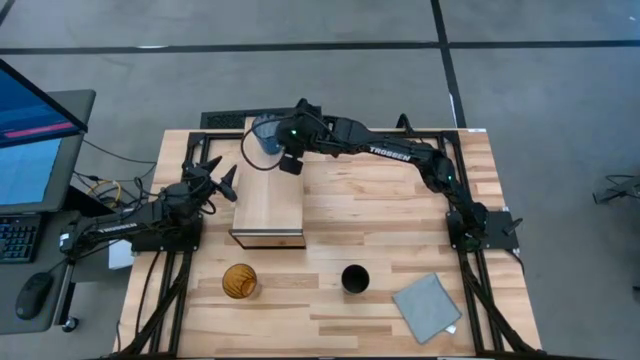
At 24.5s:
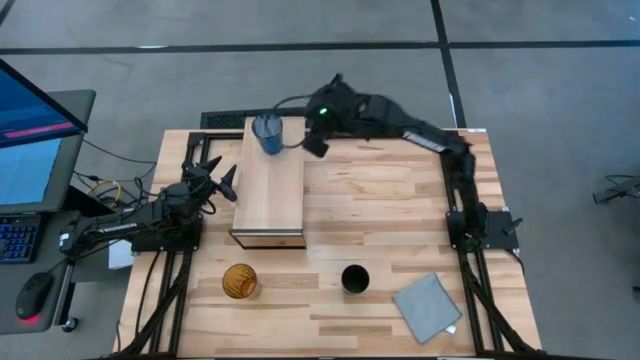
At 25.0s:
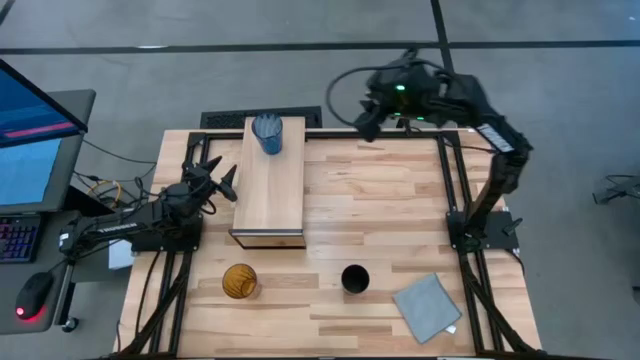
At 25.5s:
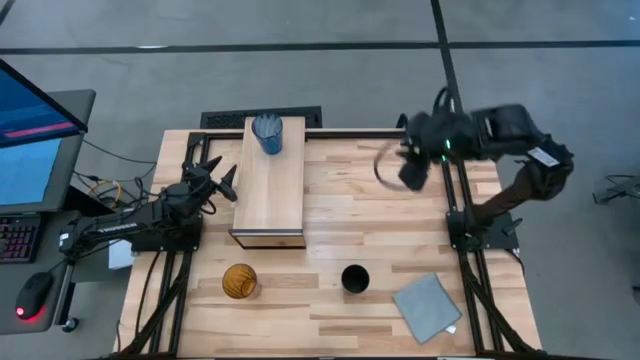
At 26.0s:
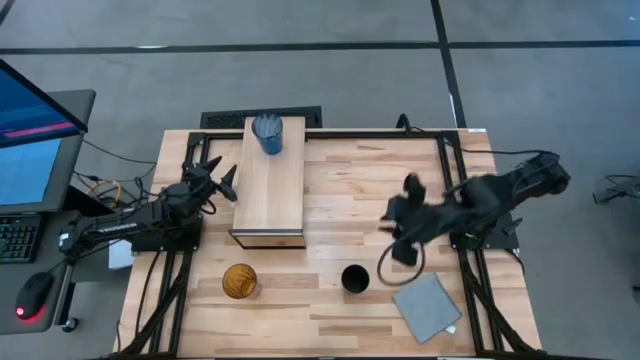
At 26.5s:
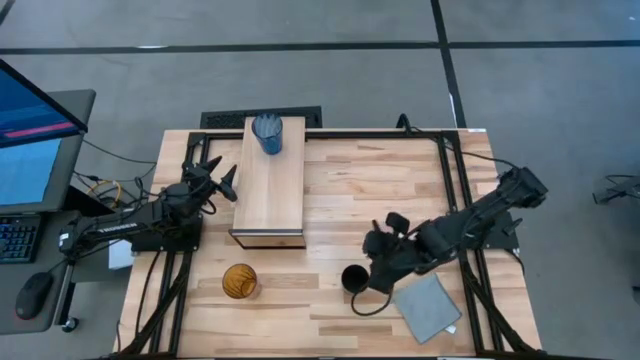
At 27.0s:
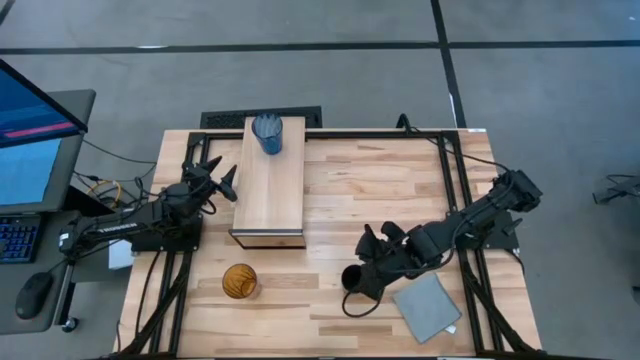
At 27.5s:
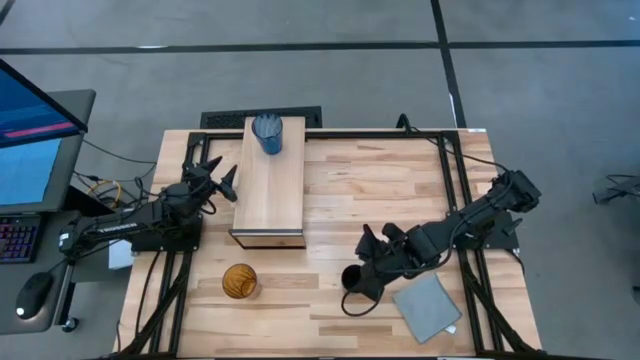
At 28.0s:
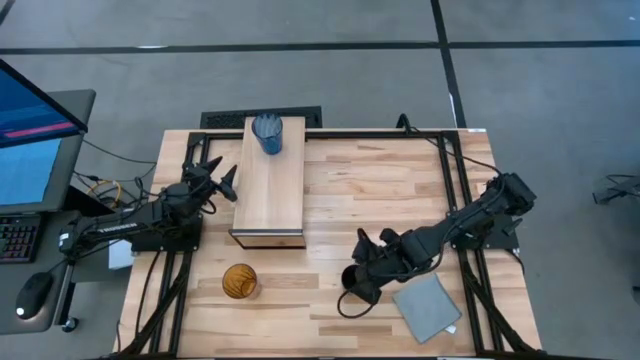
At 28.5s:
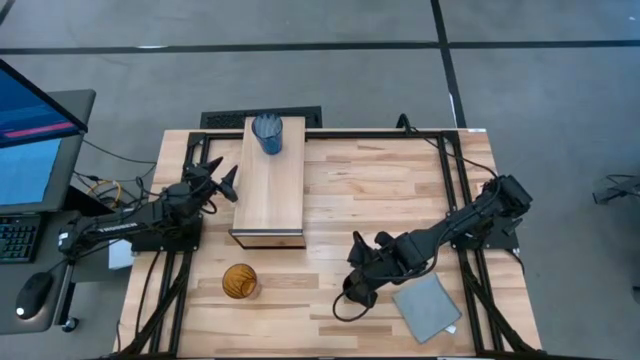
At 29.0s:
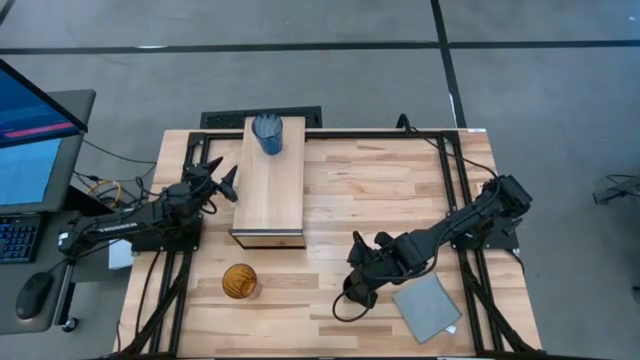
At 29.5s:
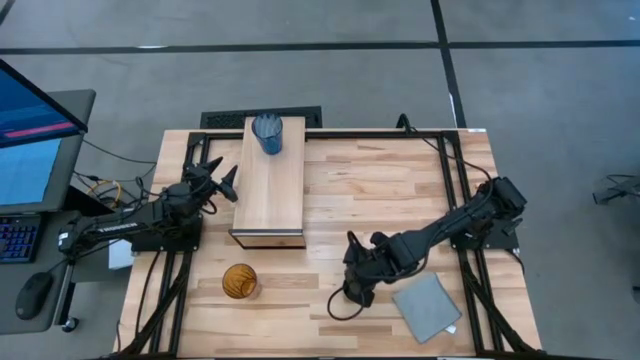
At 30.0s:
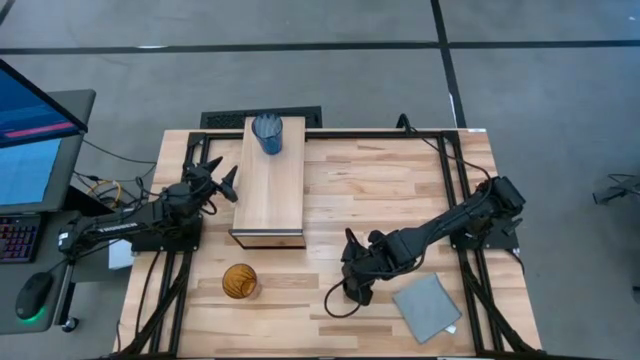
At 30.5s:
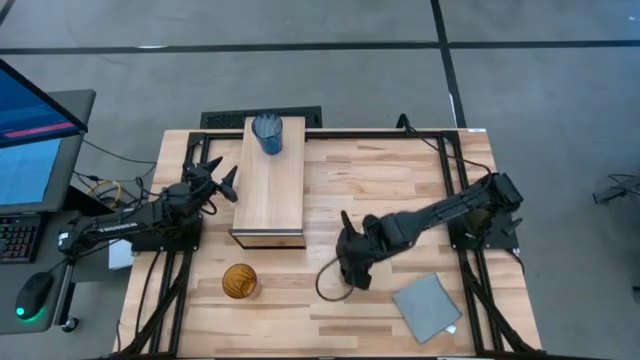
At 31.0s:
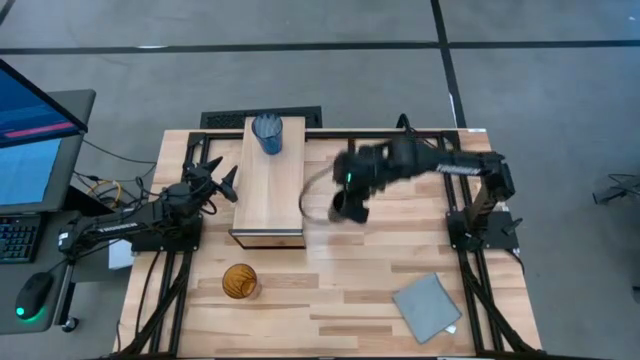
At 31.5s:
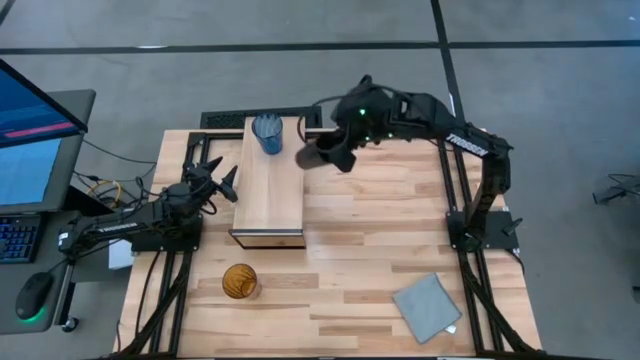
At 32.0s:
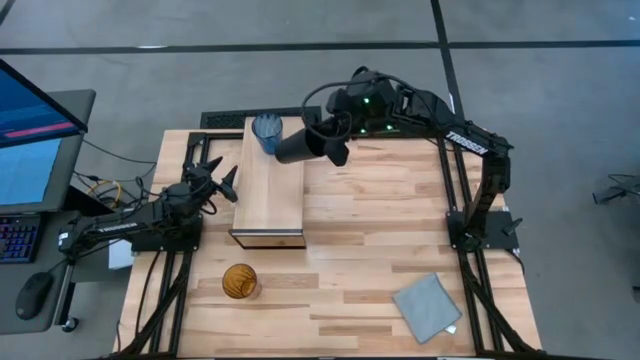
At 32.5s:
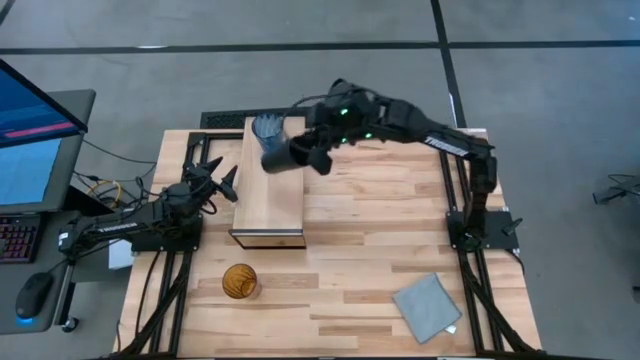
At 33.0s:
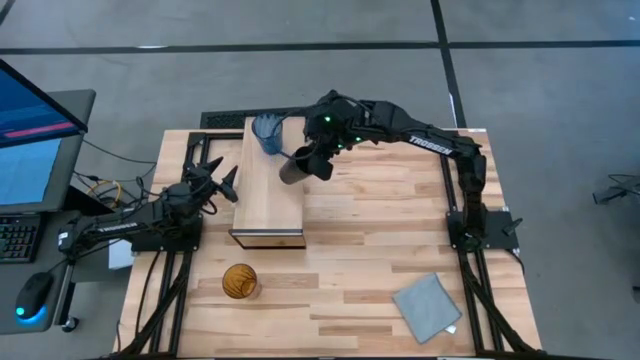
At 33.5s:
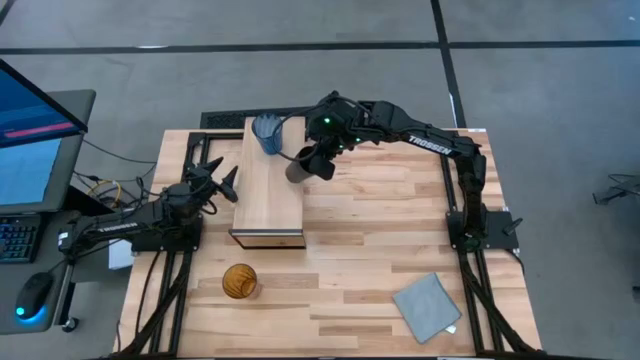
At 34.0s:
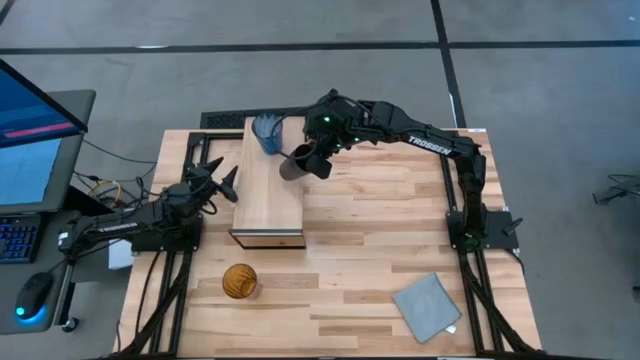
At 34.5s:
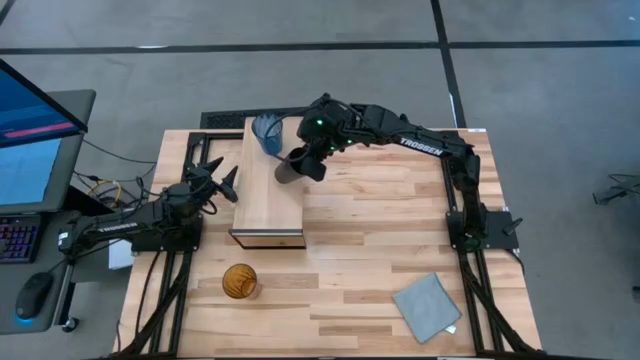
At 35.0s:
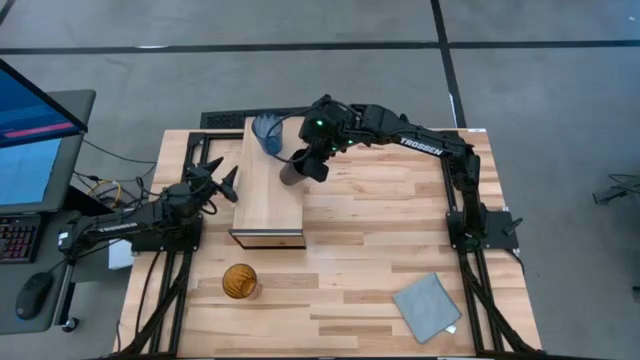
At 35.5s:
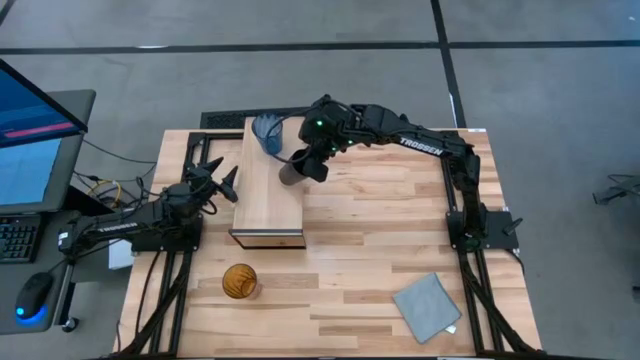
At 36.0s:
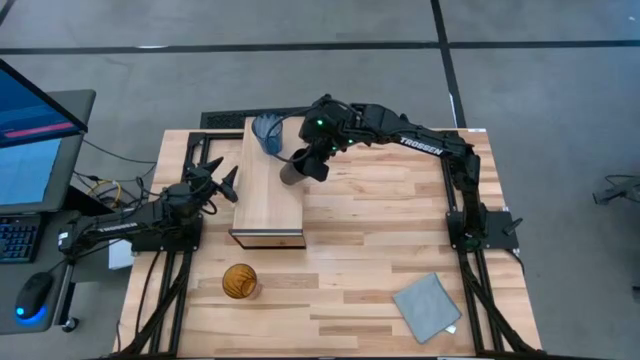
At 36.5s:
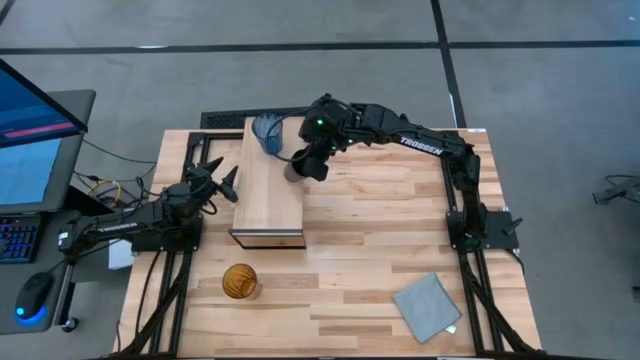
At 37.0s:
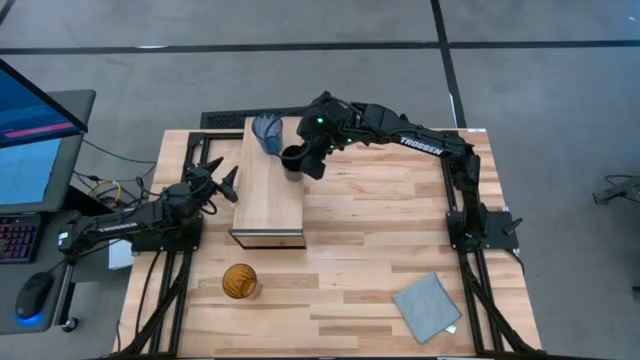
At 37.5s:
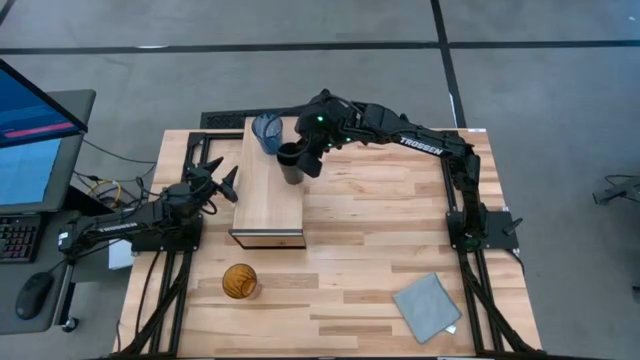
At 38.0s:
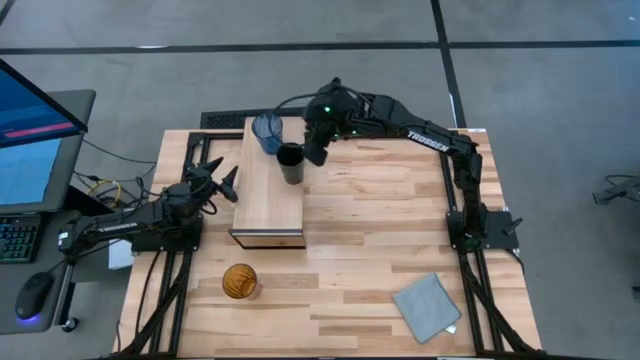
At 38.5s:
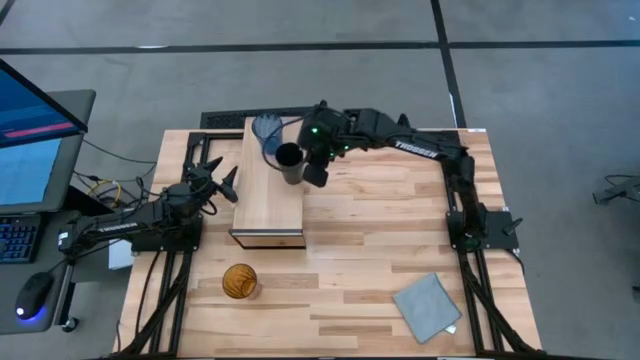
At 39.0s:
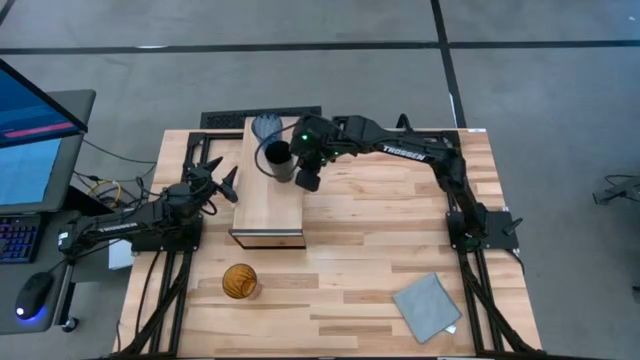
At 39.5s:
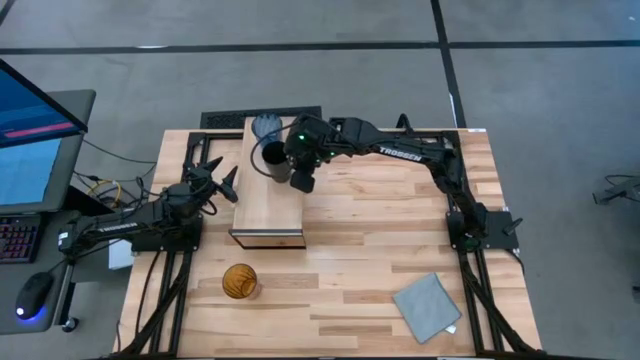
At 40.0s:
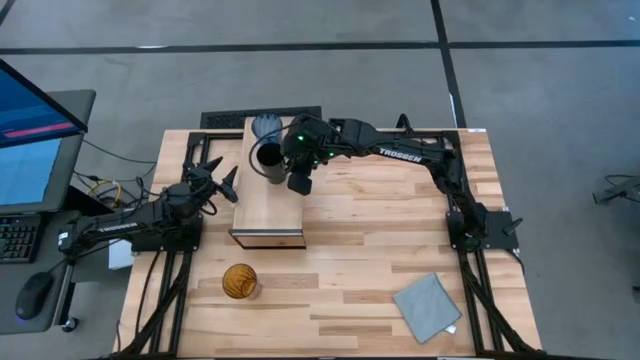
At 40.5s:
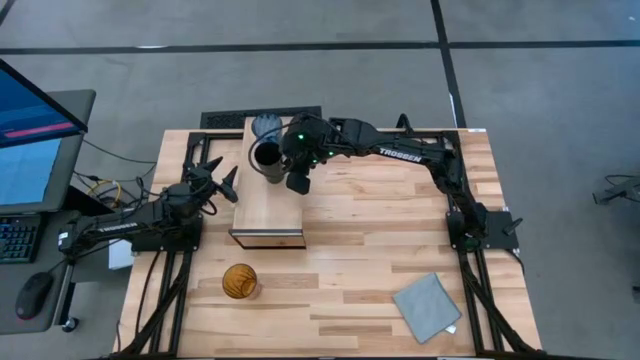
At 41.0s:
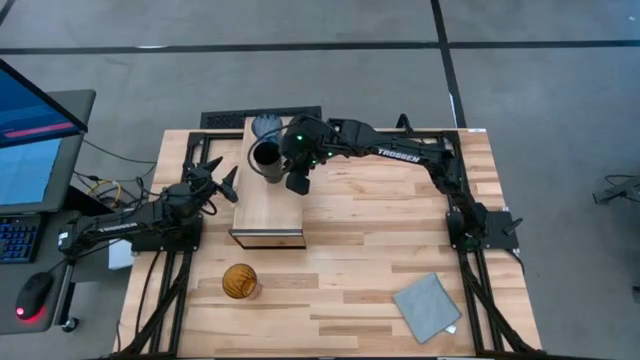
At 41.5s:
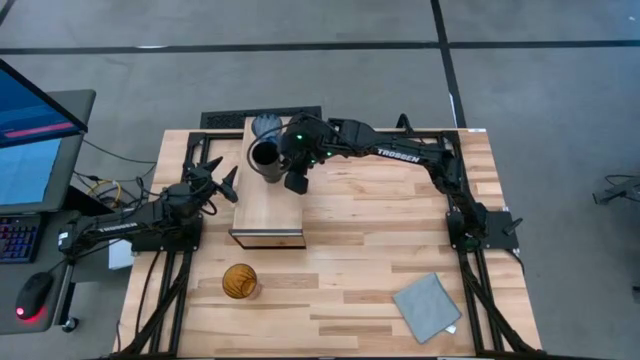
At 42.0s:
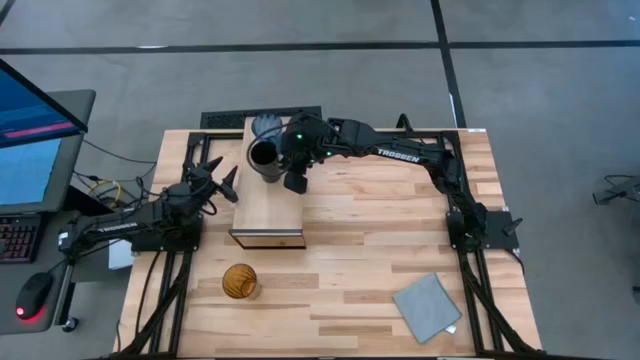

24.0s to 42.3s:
Task: Stack small to large cups/mugs on shelf
Put the black cup on the shelf
